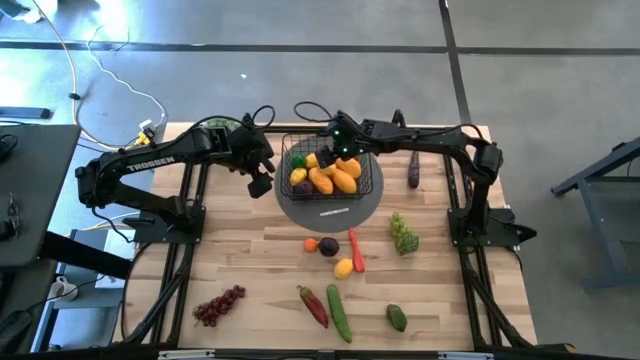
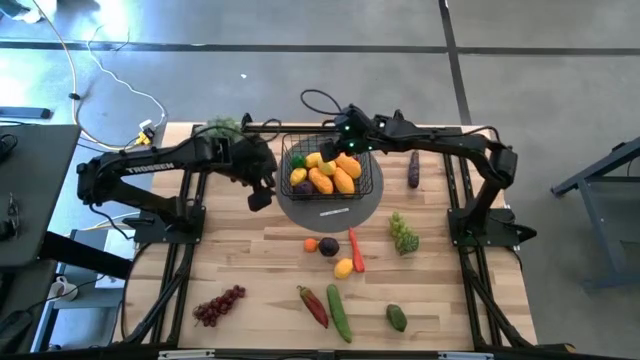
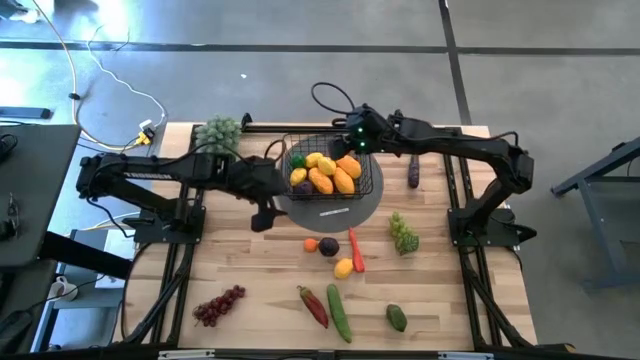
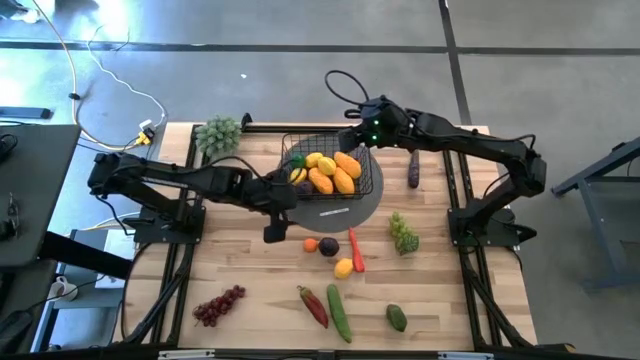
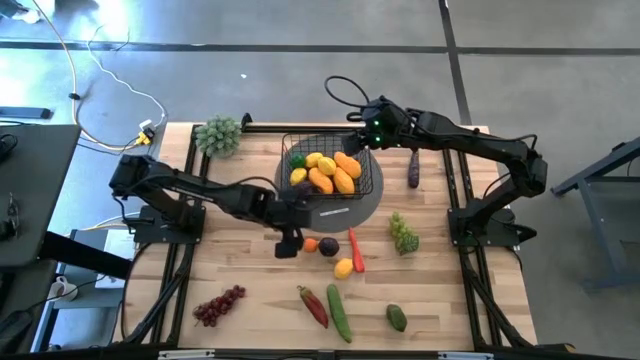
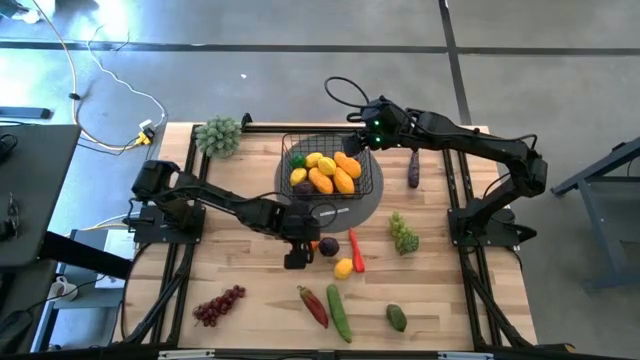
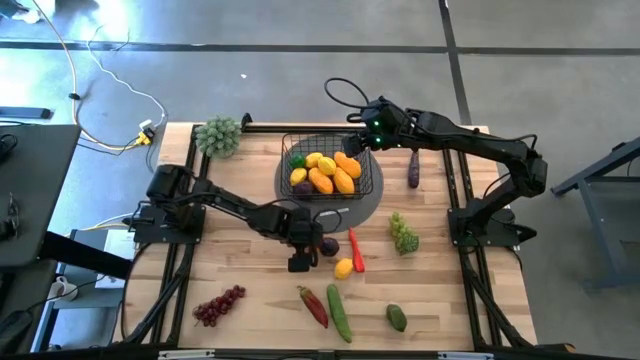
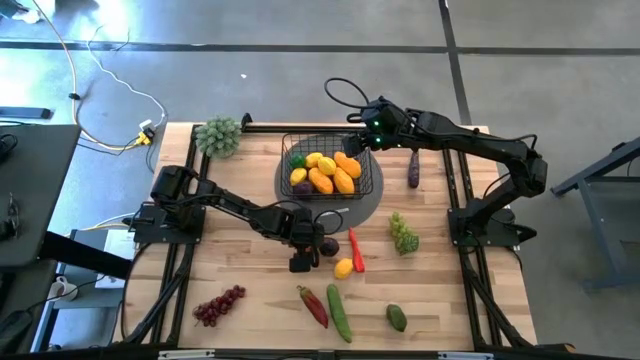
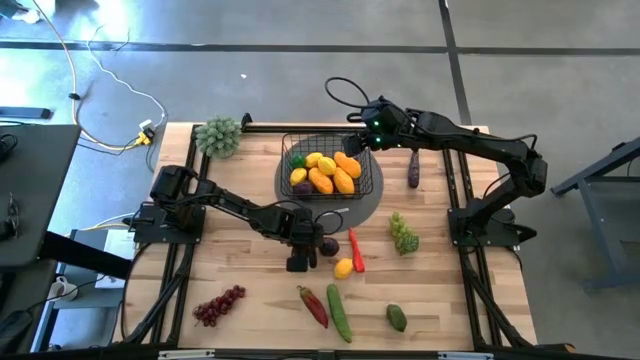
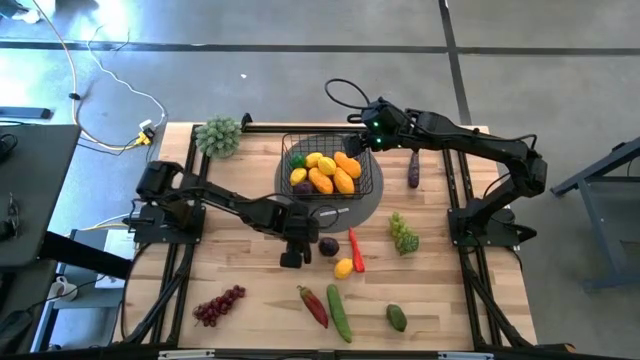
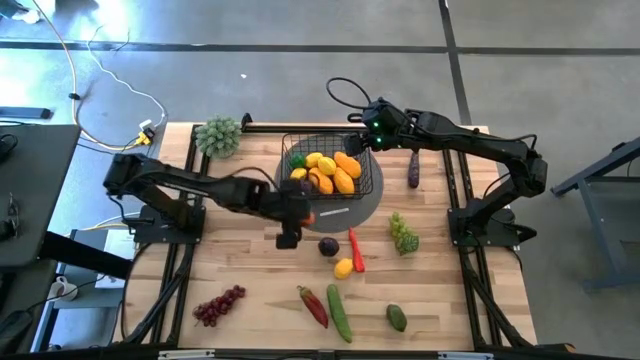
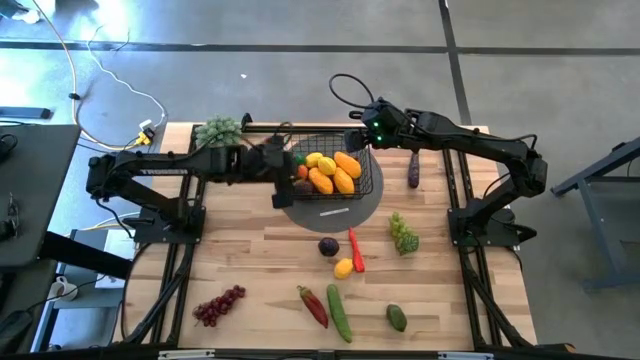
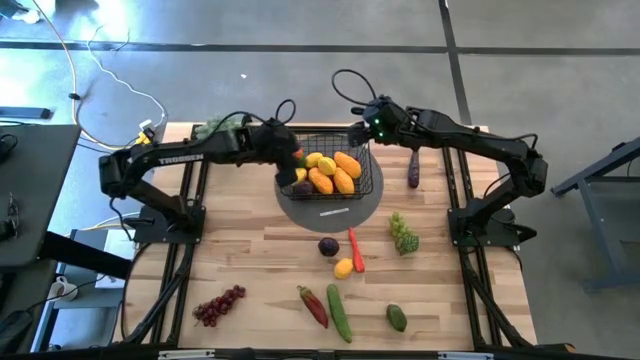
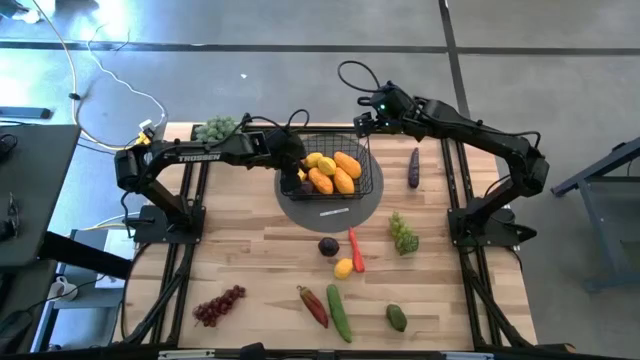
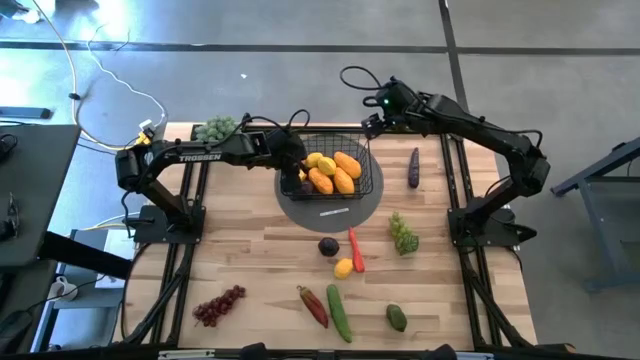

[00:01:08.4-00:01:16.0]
Task: Build produce basket
Put the orange into the black wire basket

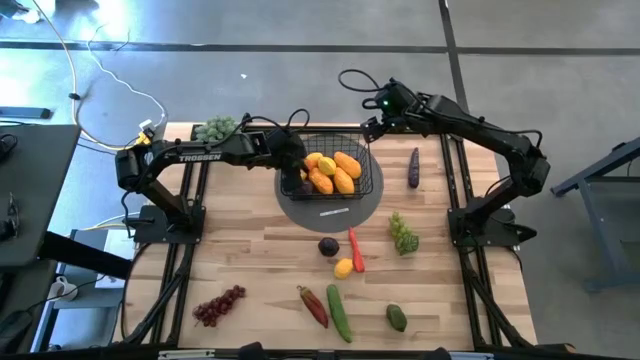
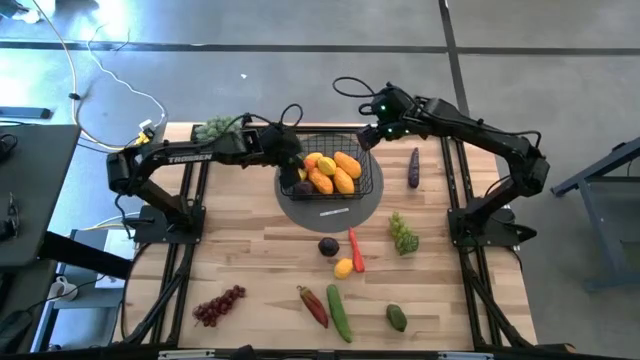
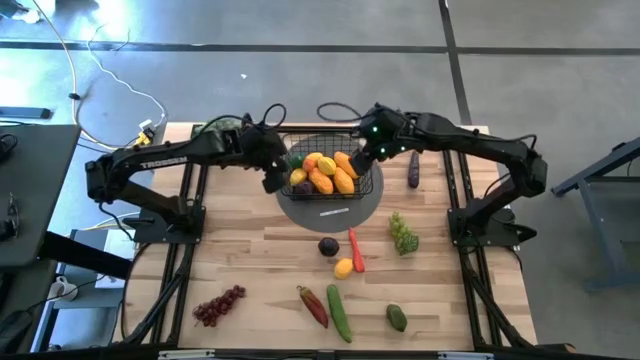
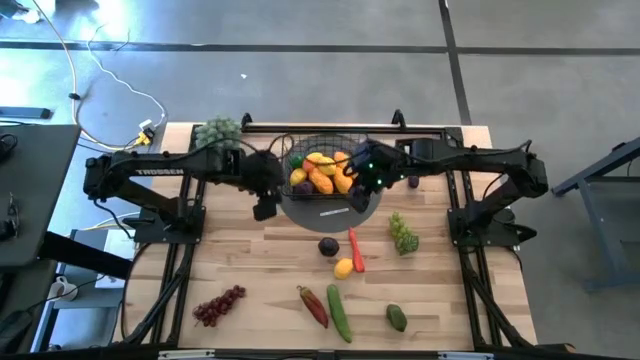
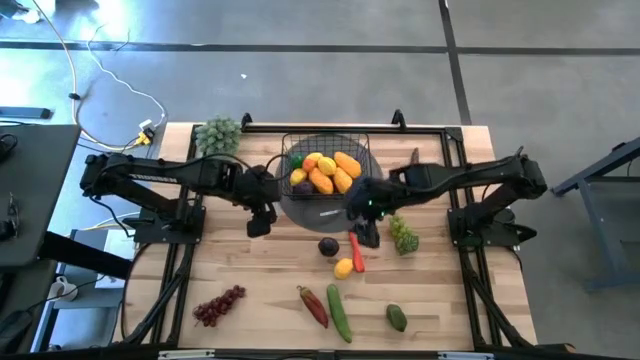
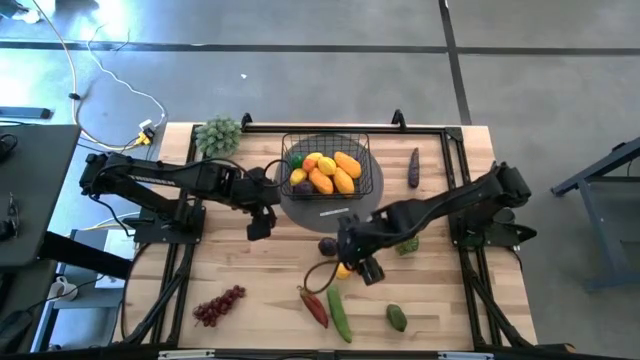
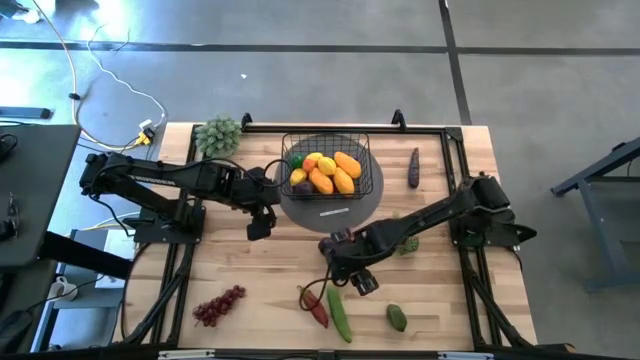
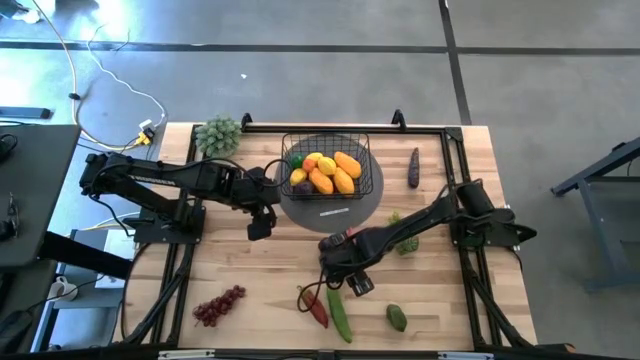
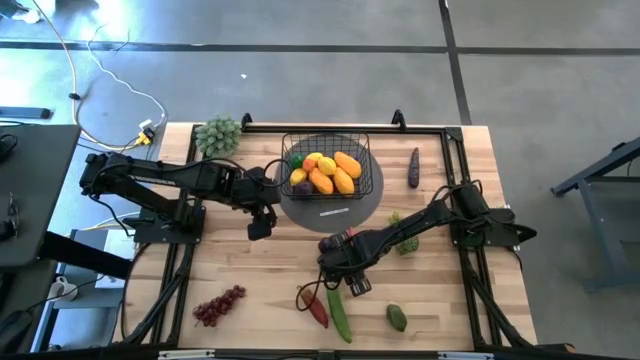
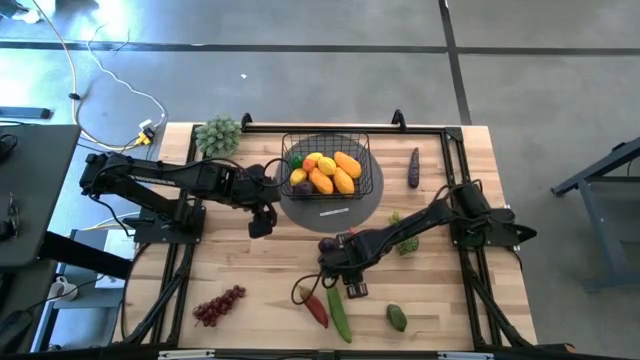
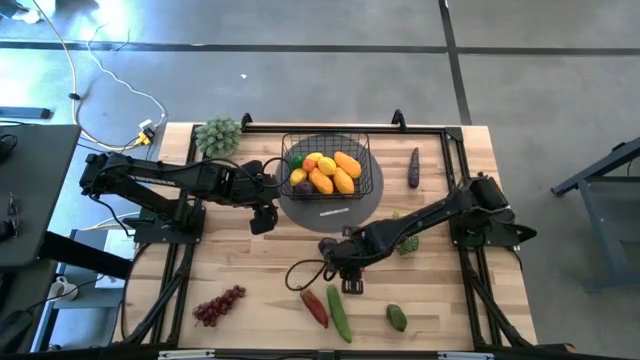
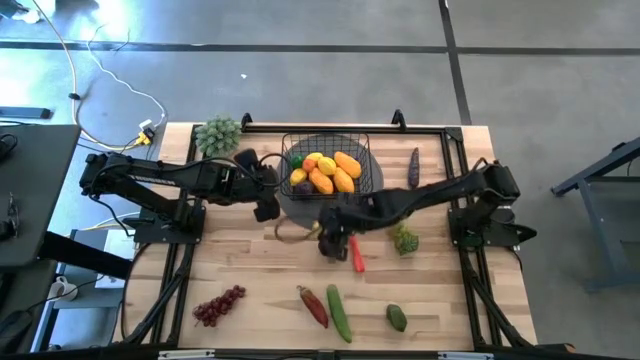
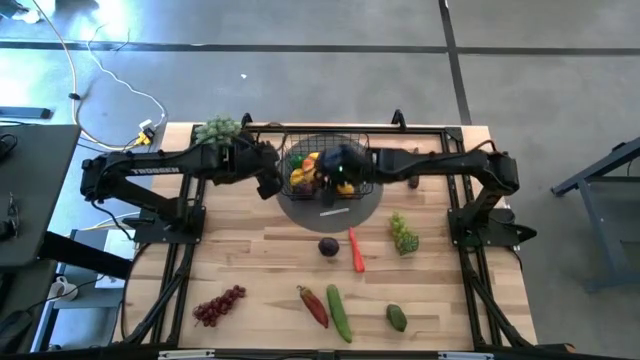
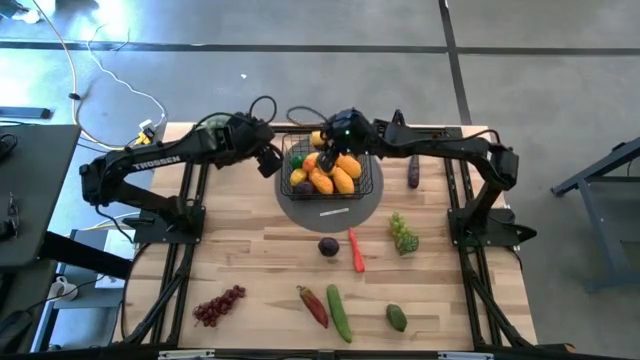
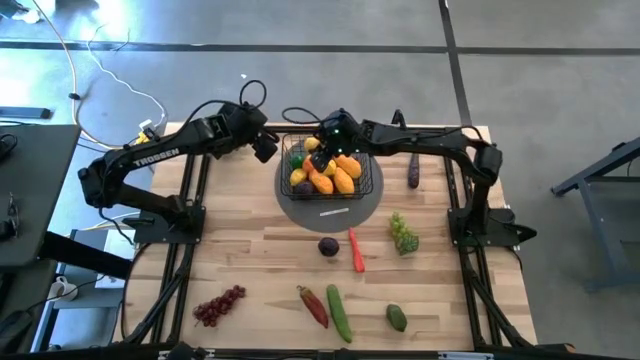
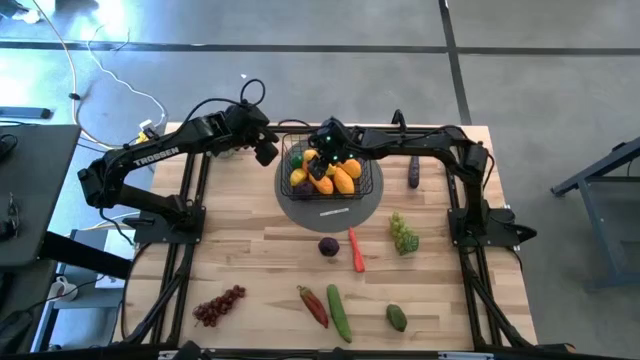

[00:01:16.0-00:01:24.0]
Put the lemon into the black wire basket

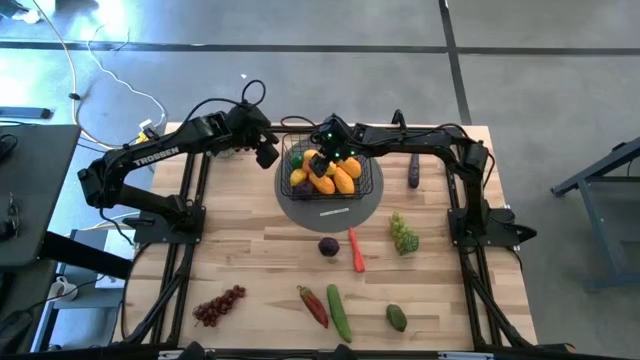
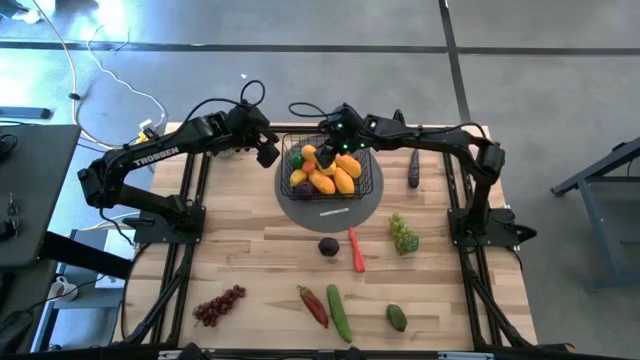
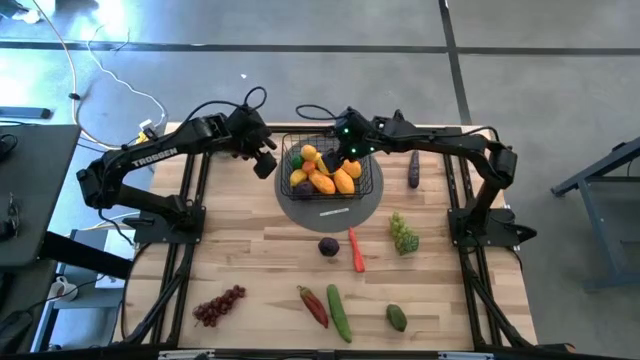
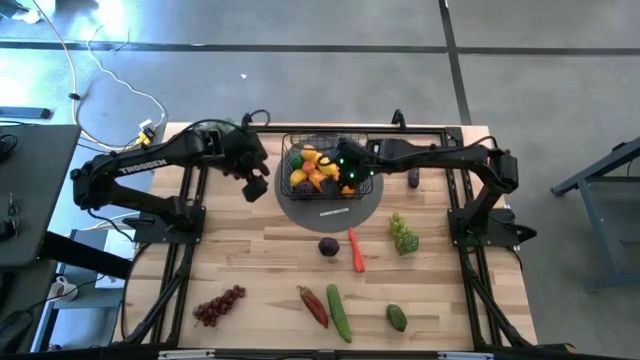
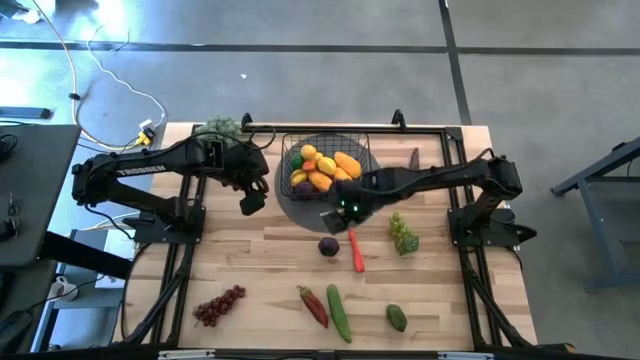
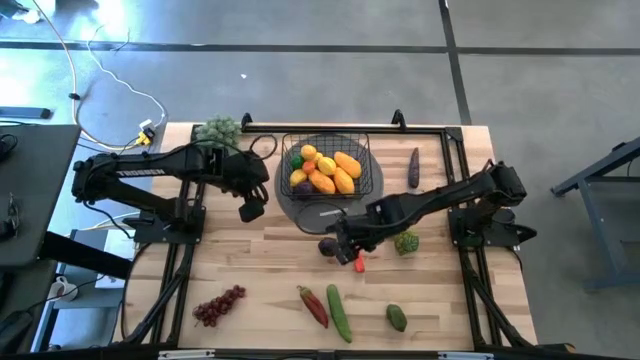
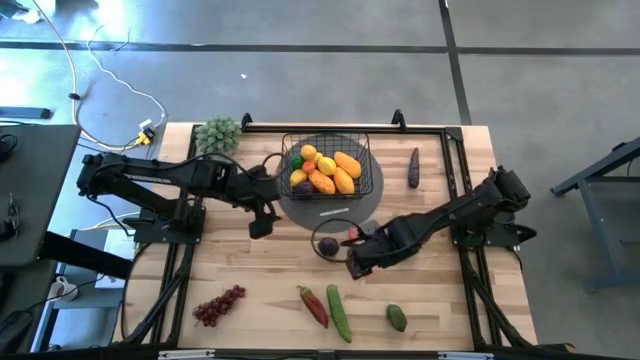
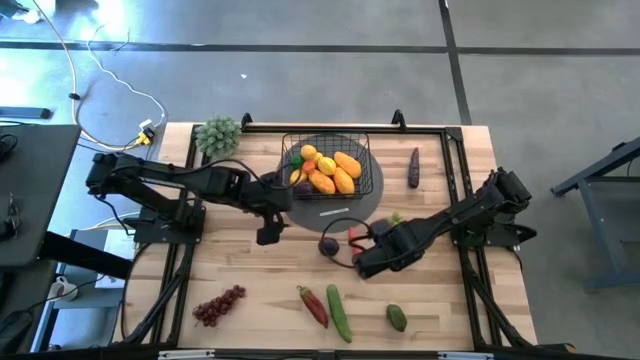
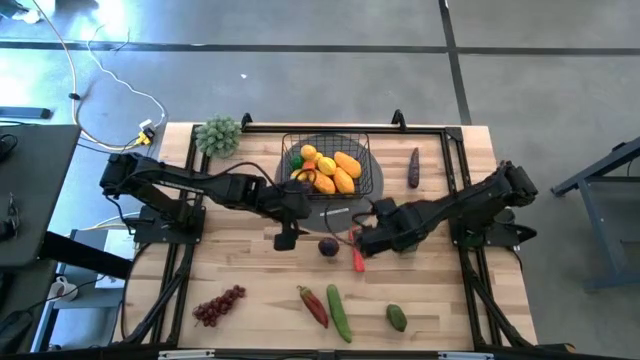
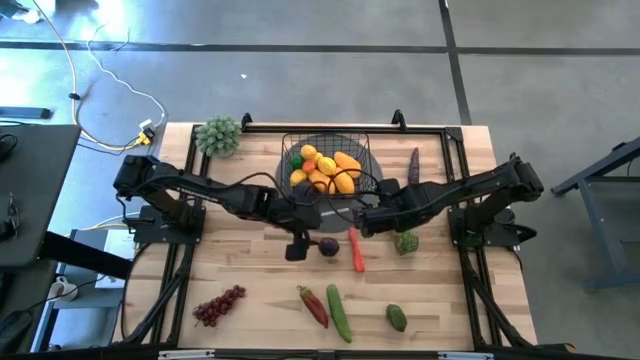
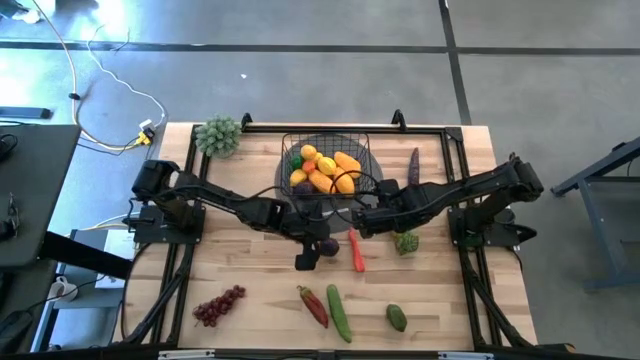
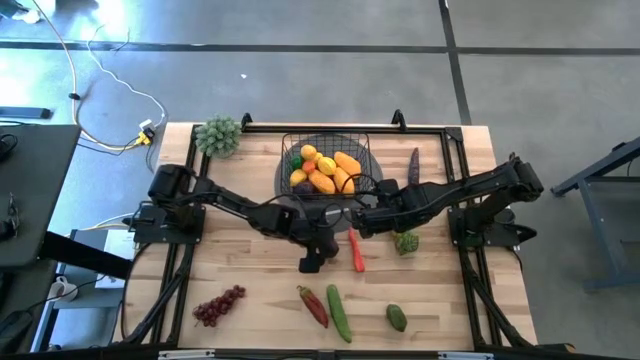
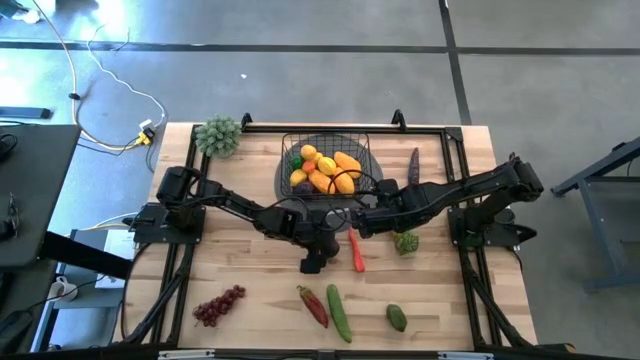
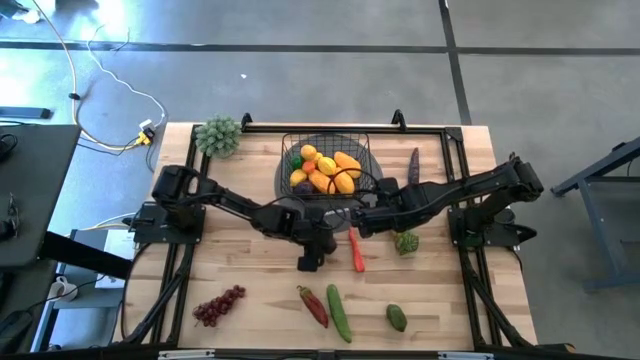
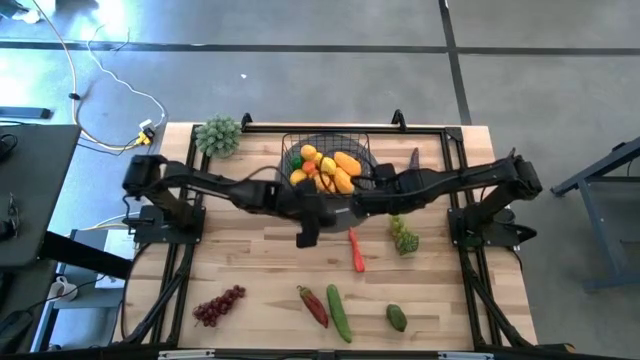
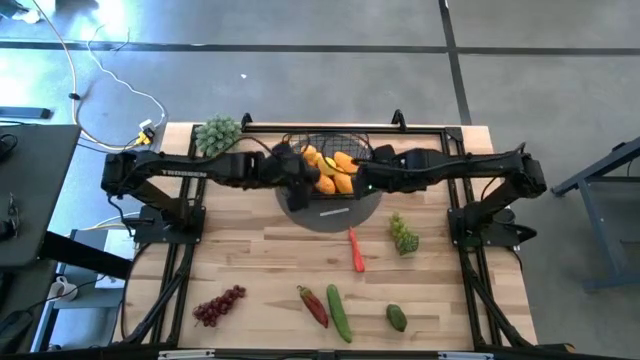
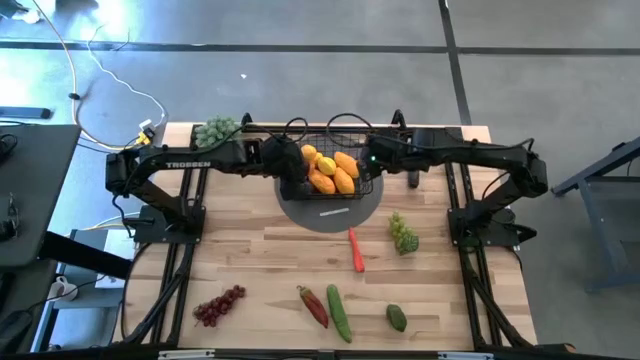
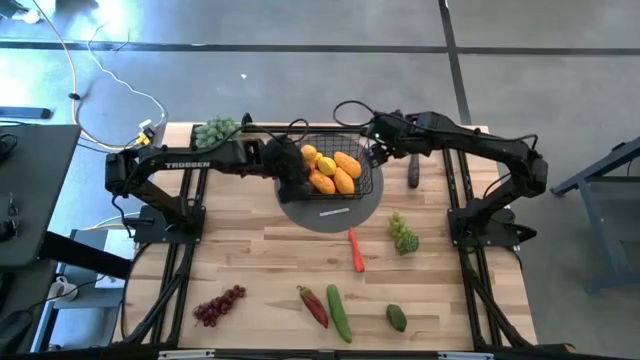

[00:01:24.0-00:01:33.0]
Put the plum into the black wire basket
